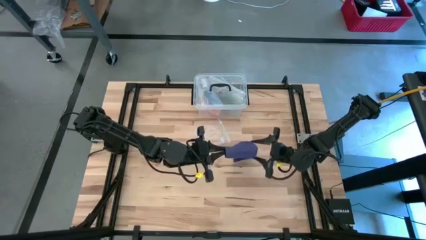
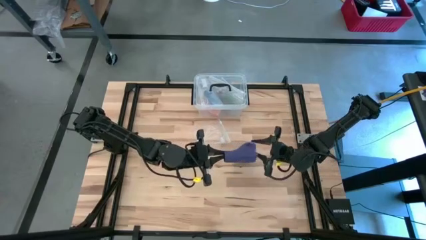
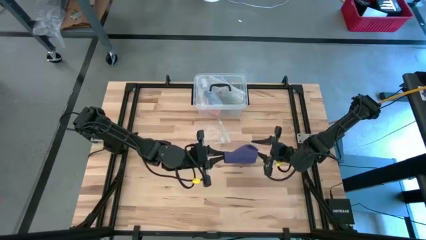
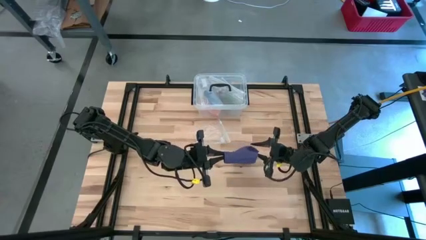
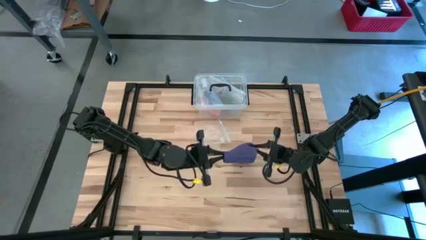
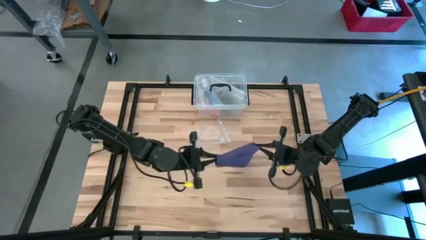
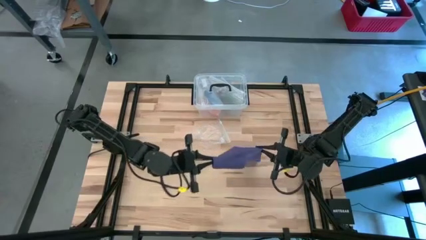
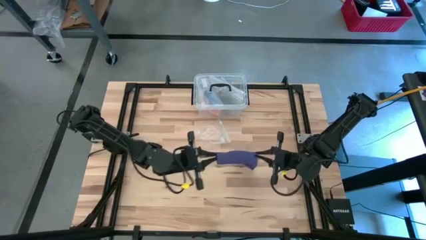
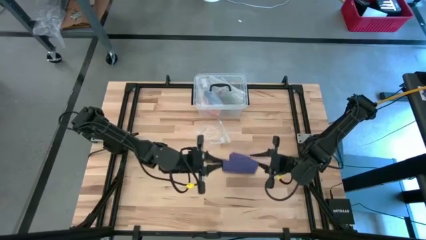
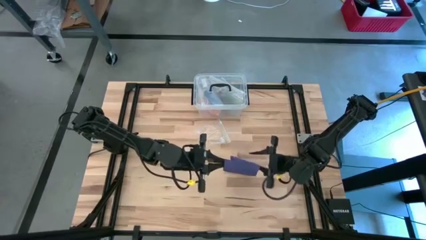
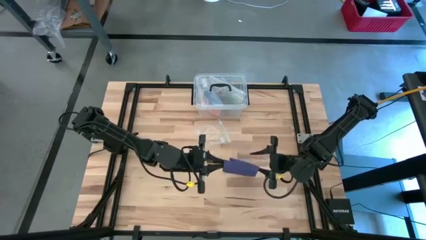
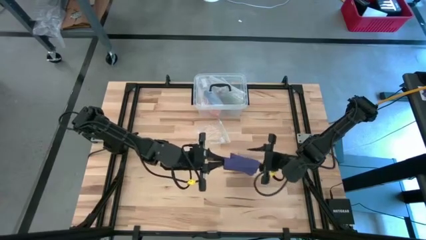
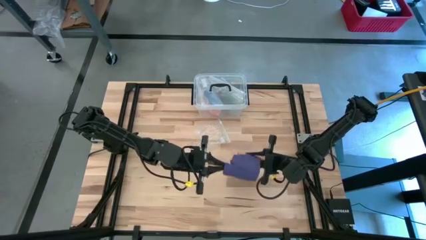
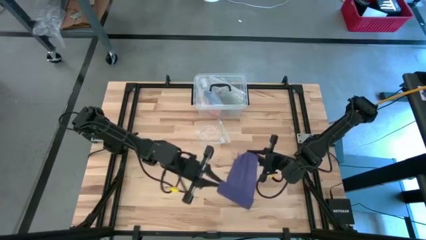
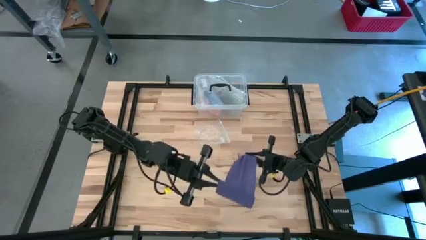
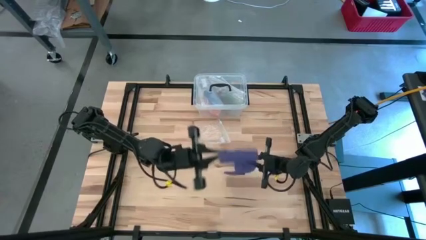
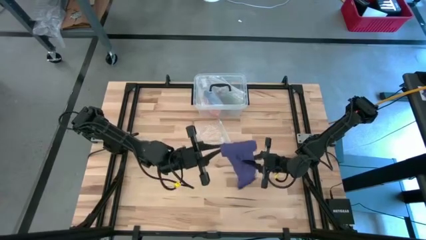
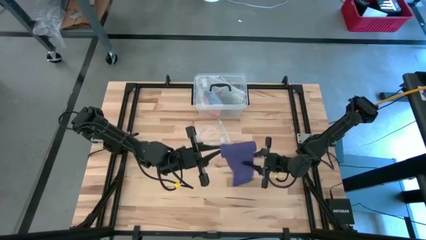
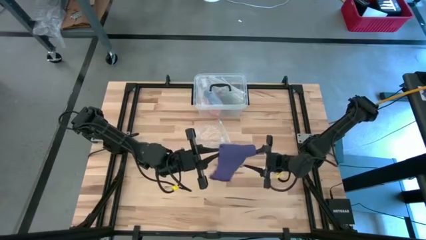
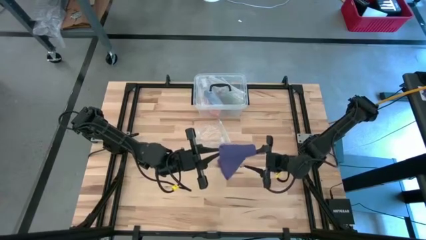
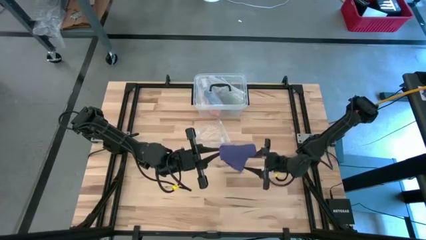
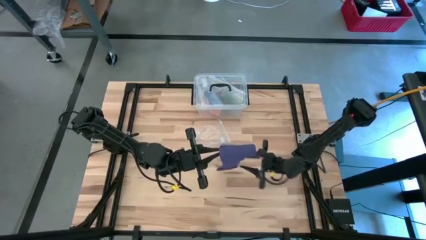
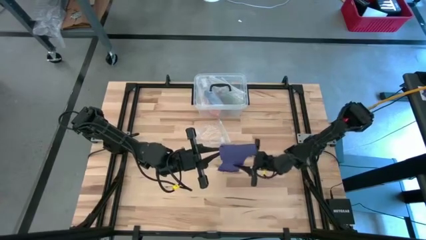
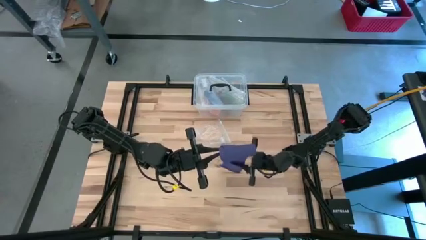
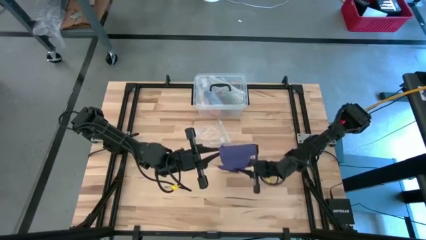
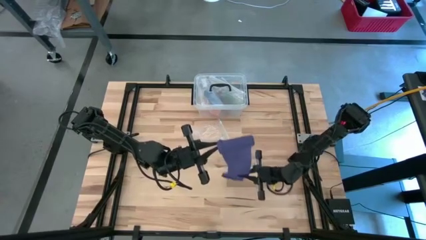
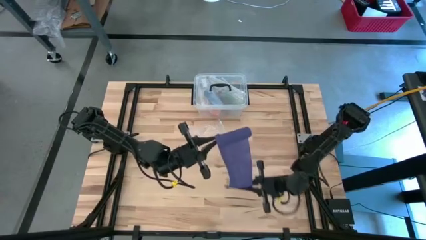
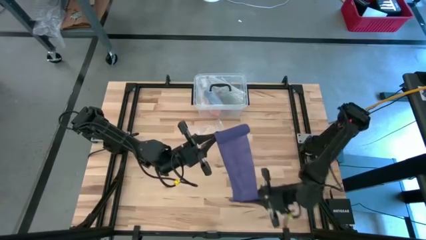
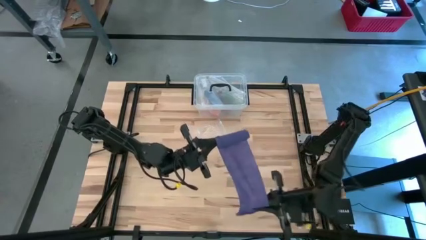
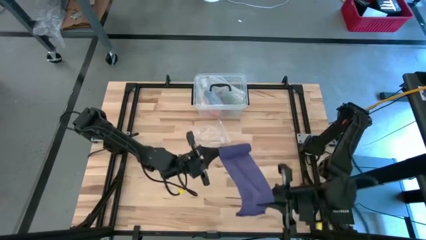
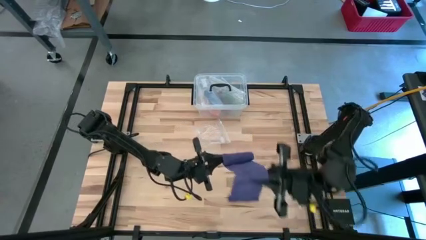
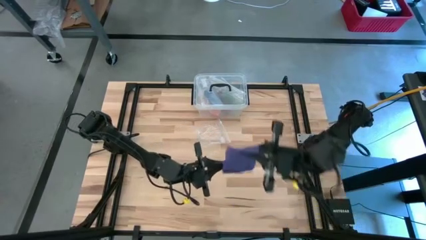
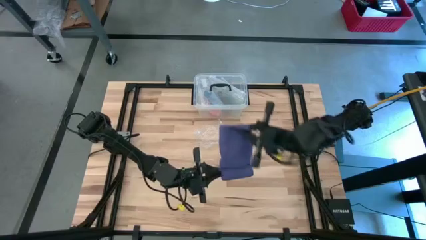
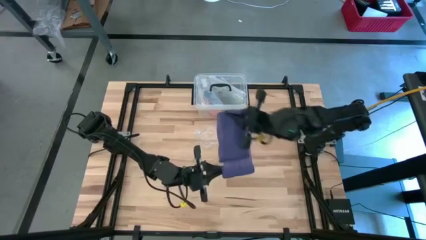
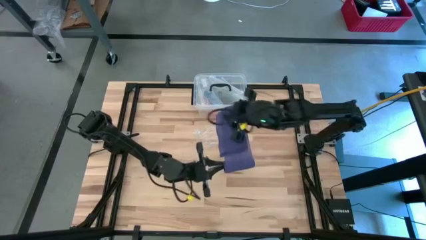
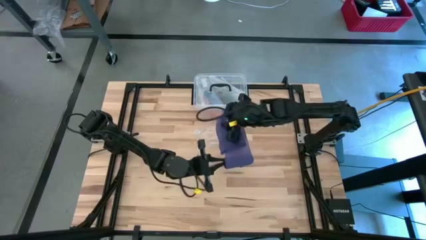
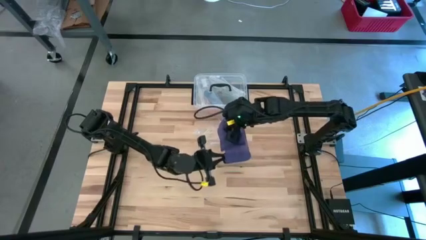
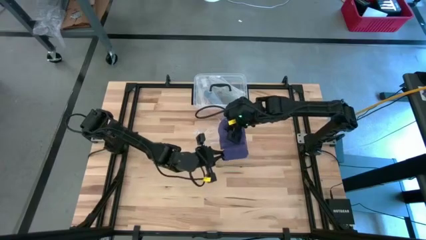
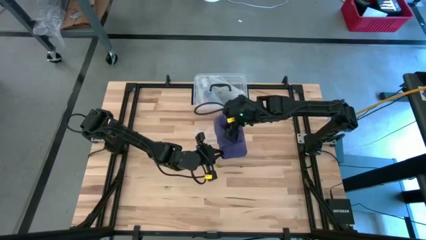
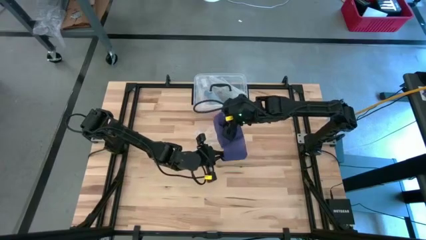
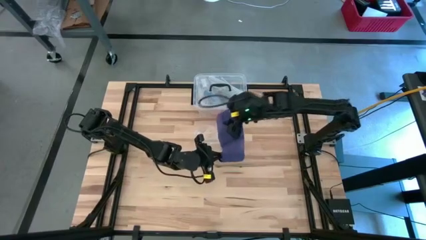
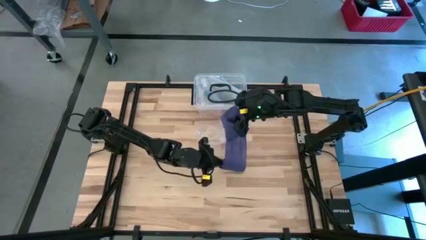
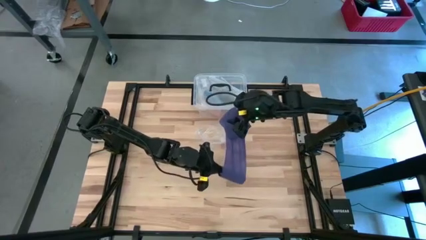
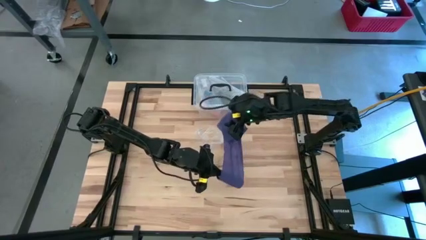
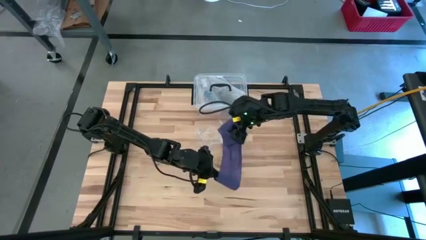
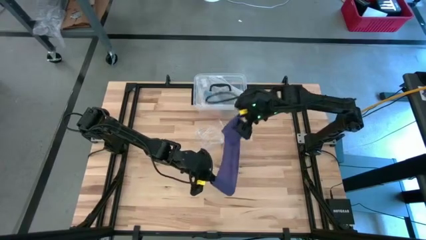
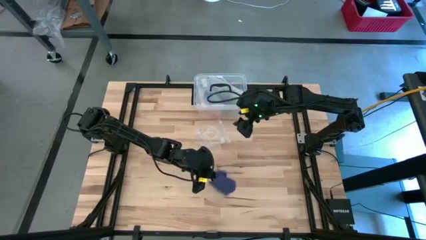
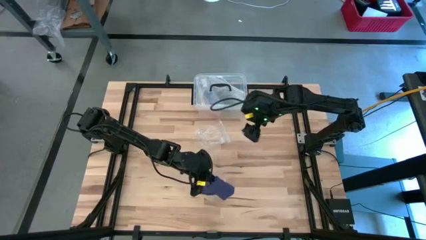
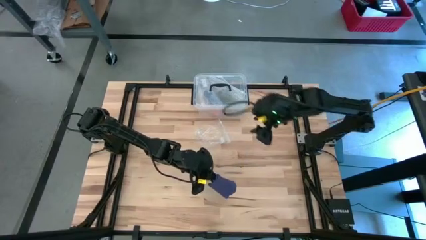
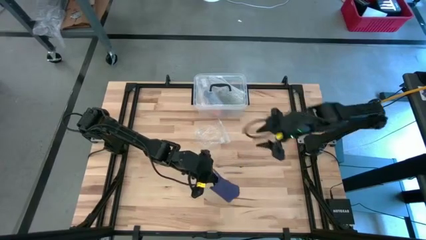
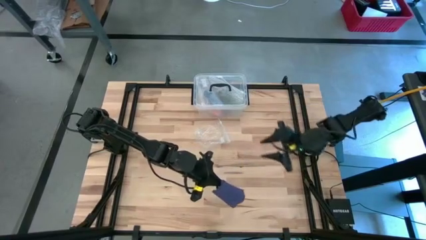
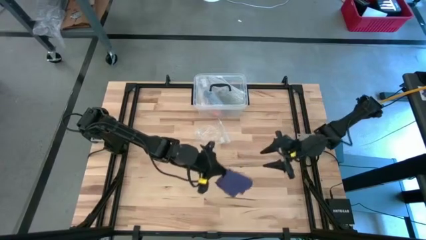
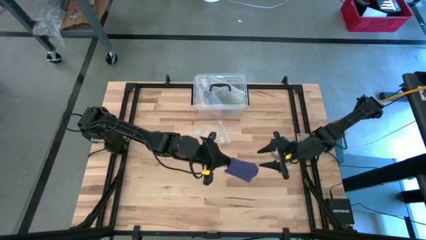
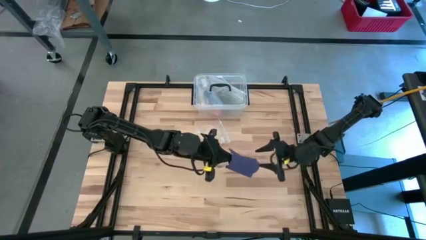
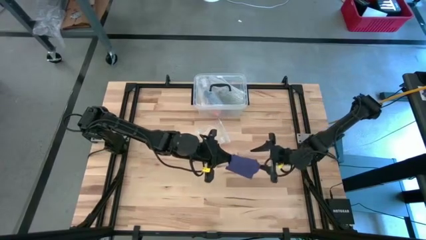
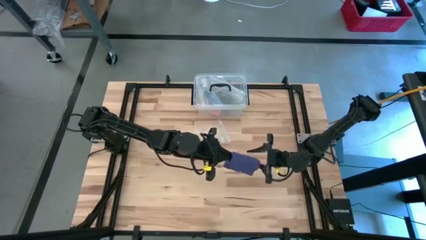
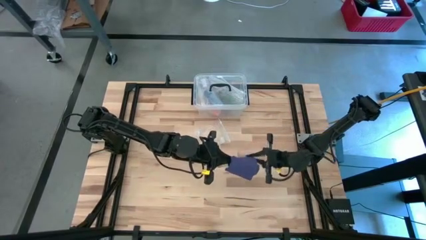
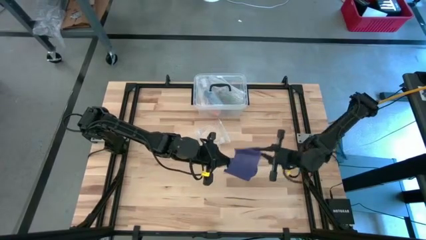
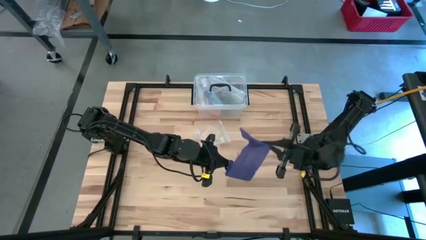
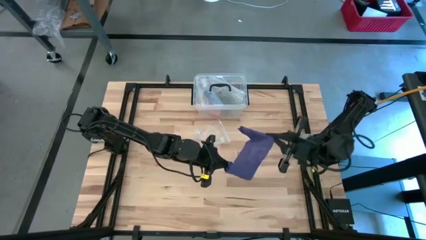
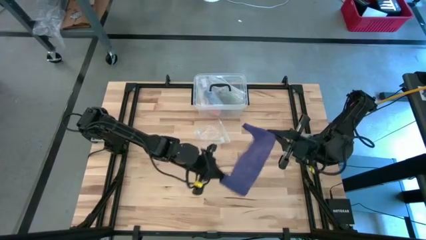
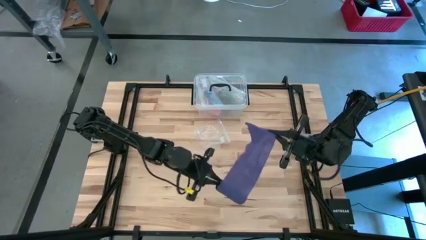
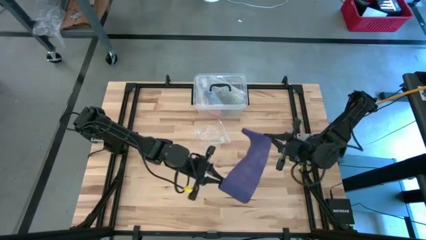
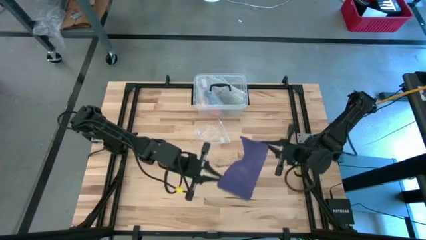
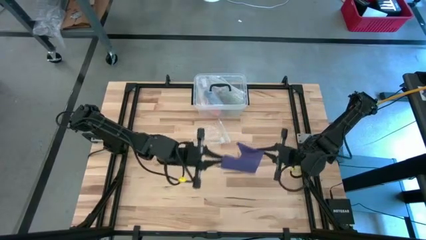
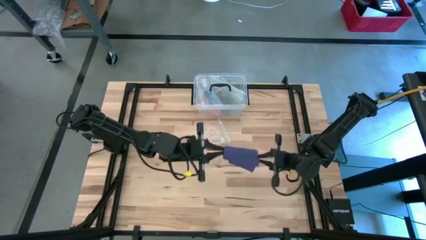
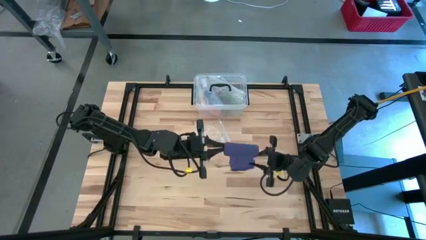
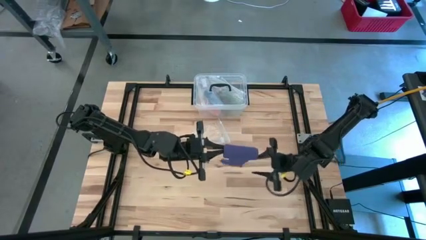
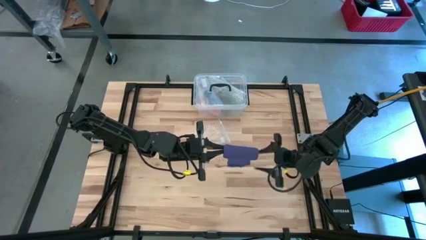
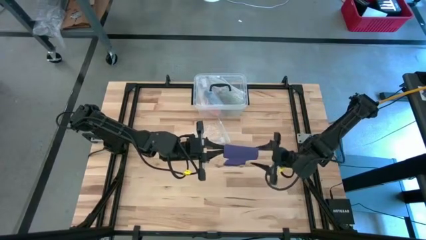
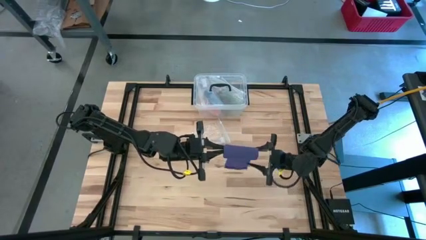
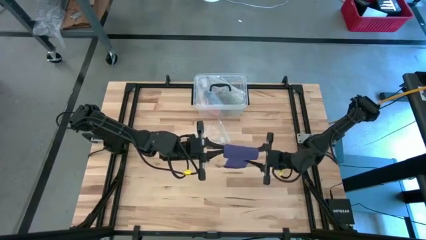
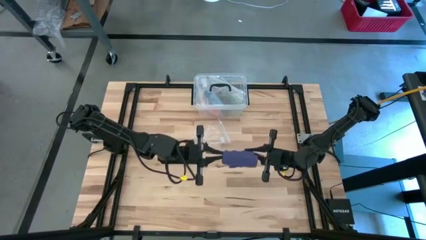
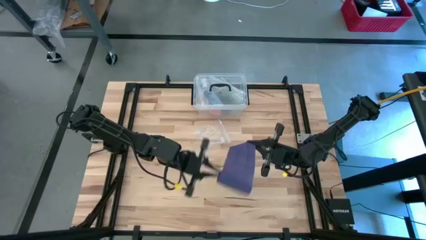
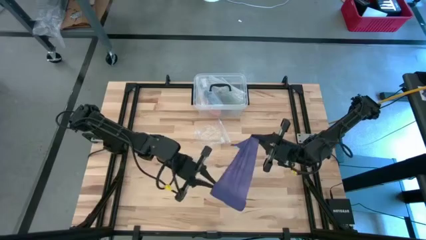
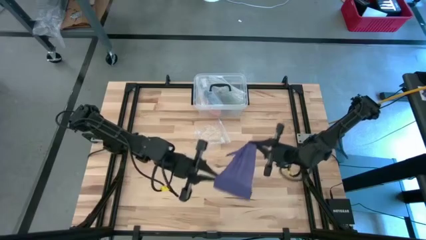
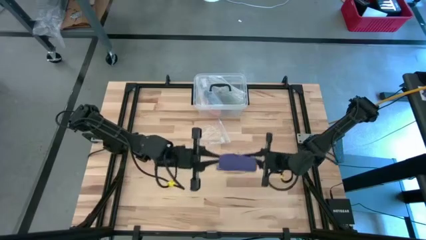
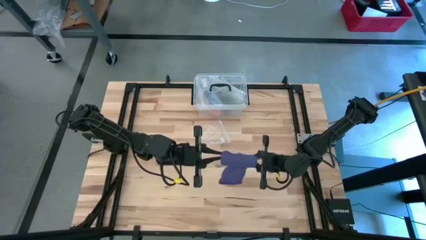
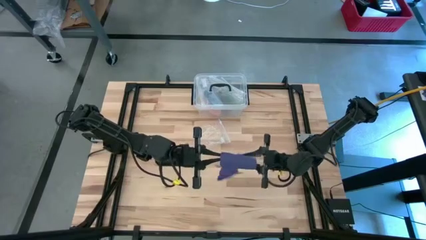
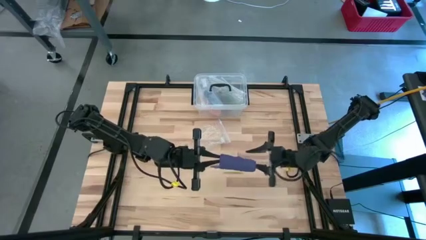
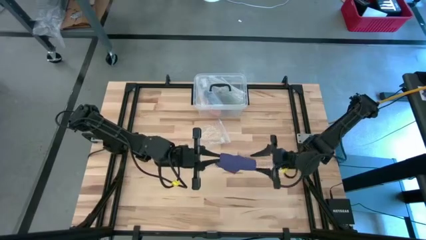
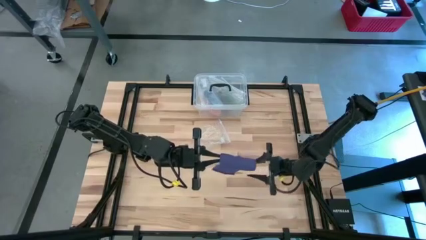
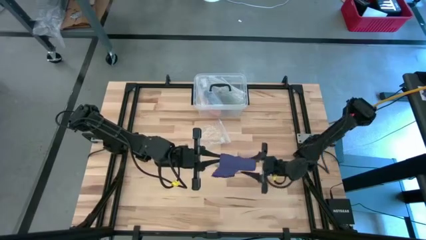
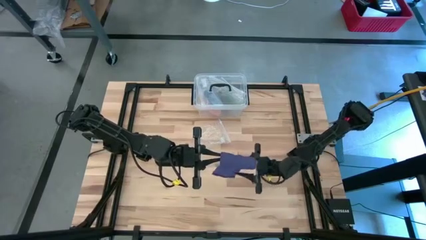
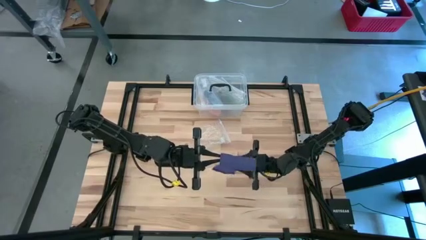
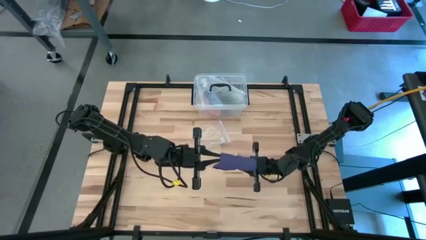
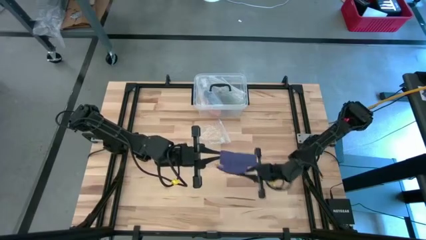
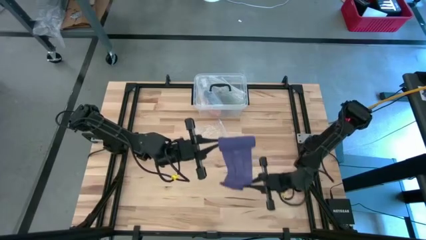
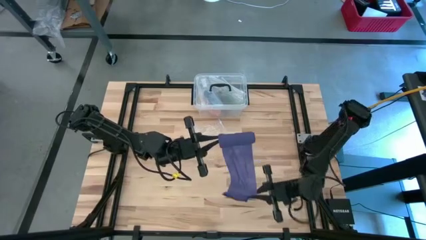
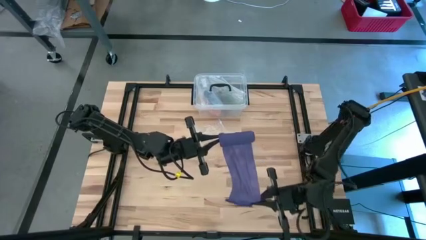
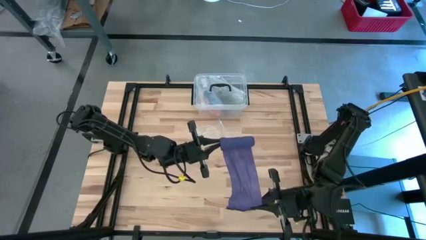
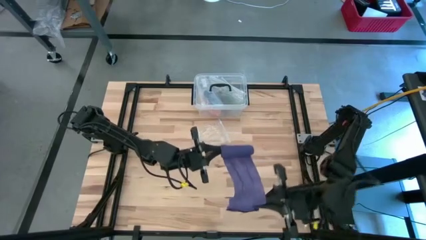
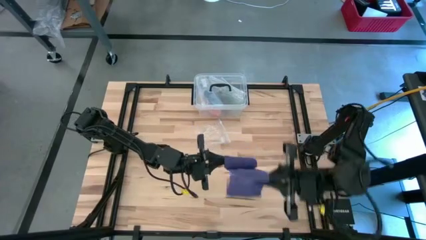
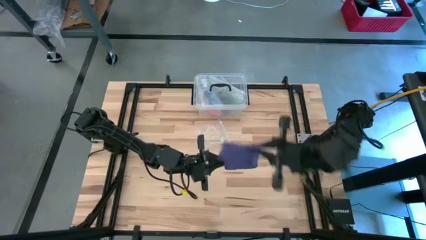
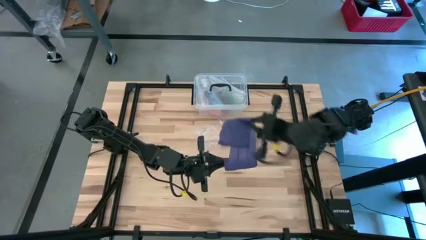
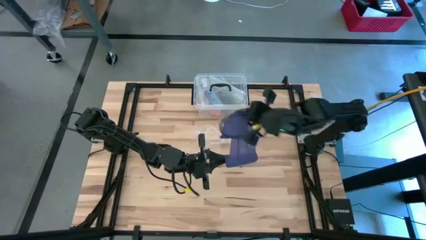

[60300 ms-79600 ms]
Task: Roll bandage
Roll the blue bandage
